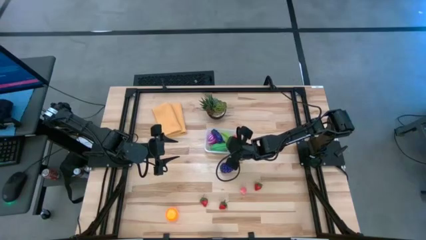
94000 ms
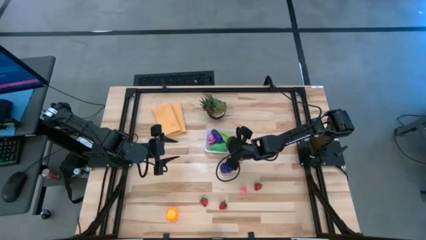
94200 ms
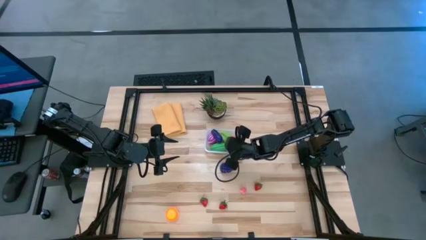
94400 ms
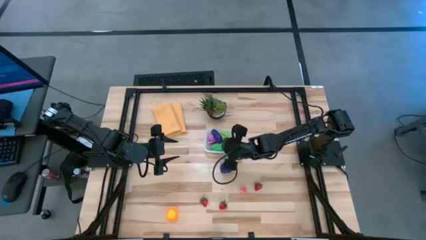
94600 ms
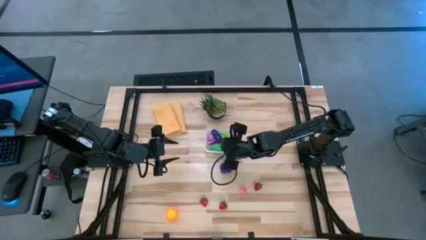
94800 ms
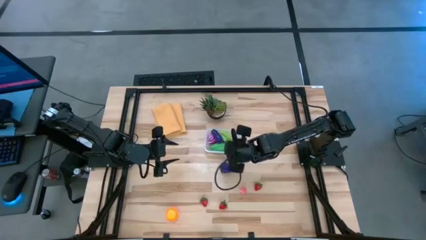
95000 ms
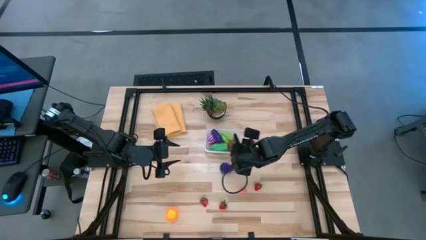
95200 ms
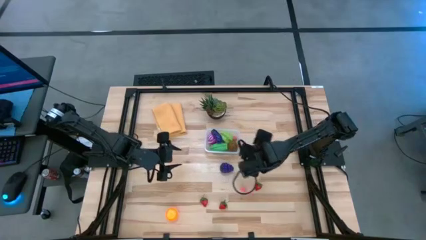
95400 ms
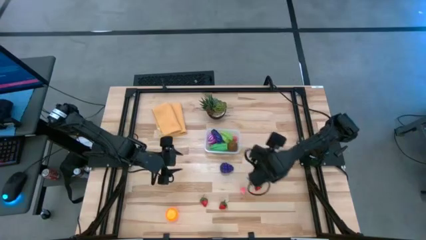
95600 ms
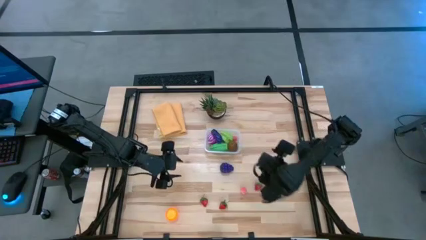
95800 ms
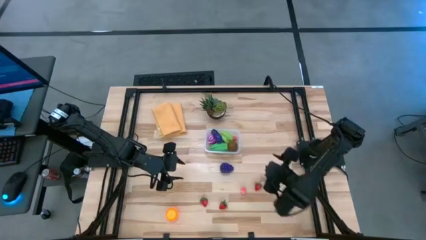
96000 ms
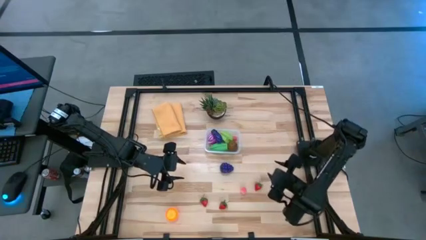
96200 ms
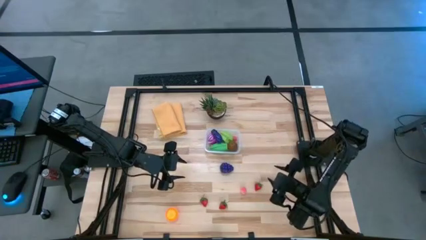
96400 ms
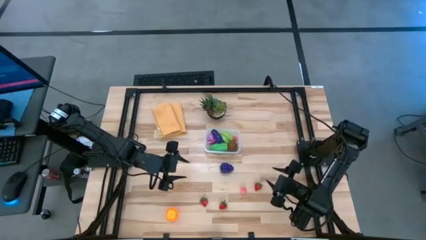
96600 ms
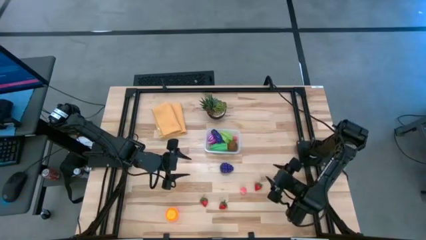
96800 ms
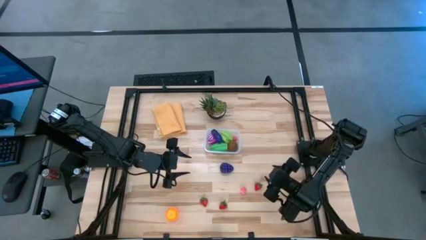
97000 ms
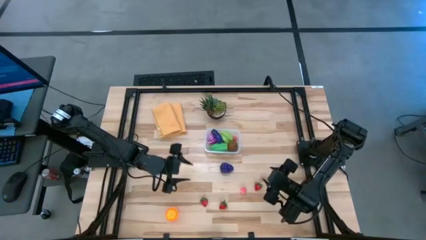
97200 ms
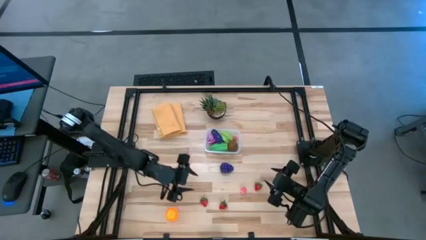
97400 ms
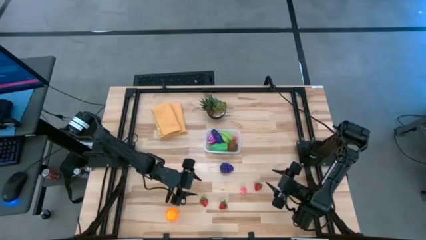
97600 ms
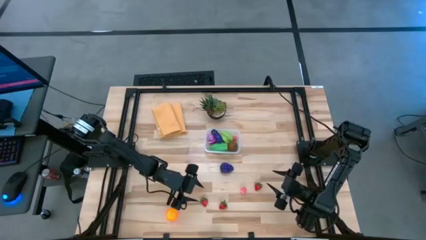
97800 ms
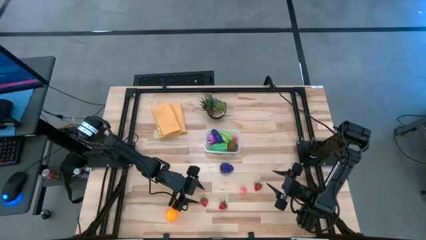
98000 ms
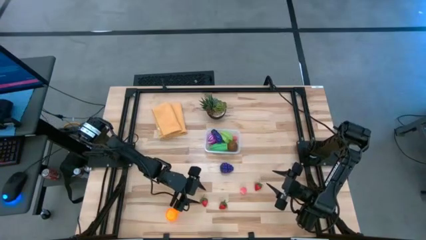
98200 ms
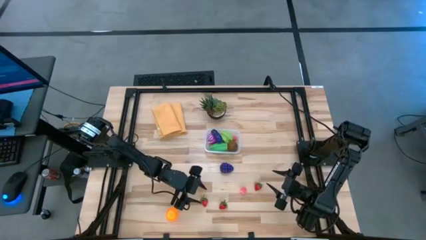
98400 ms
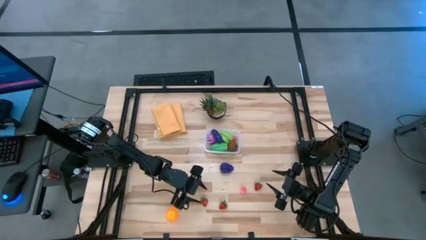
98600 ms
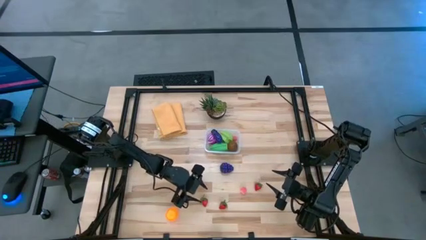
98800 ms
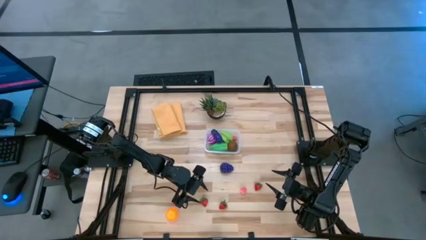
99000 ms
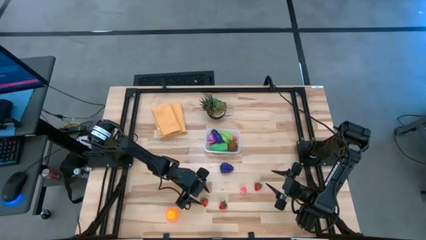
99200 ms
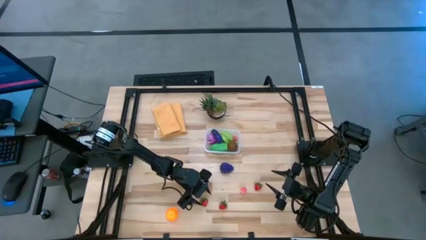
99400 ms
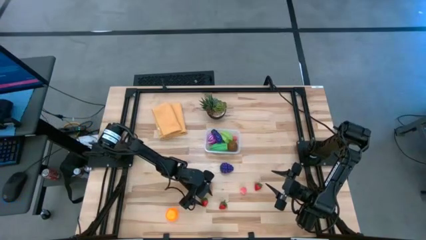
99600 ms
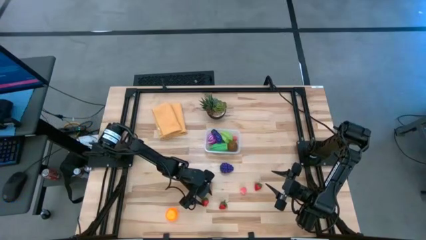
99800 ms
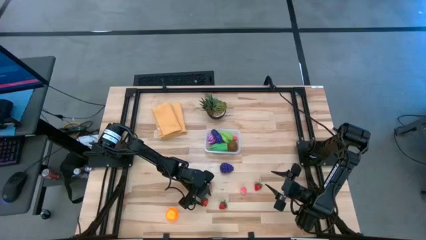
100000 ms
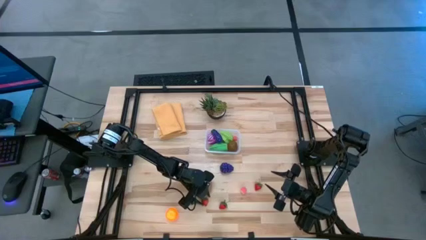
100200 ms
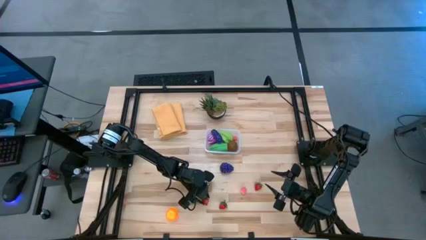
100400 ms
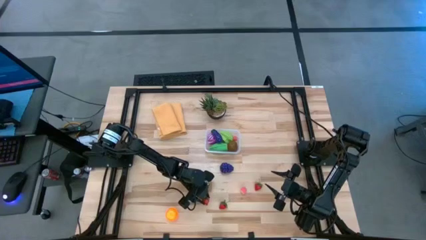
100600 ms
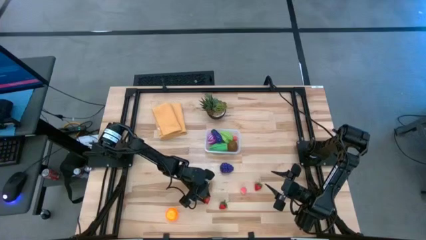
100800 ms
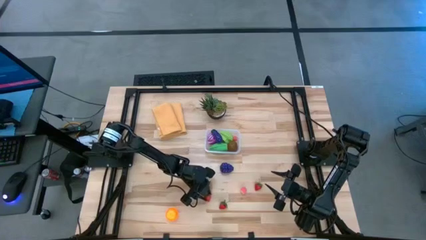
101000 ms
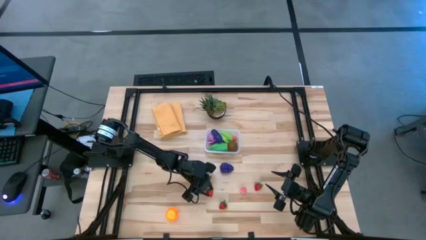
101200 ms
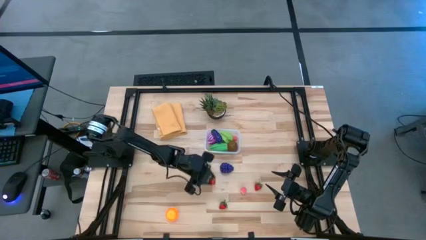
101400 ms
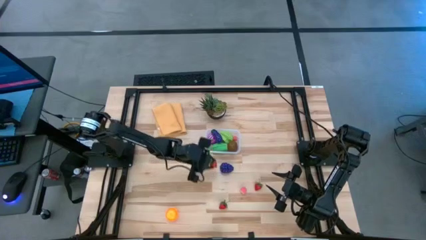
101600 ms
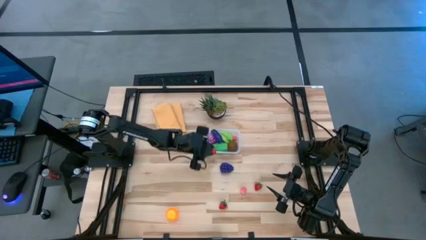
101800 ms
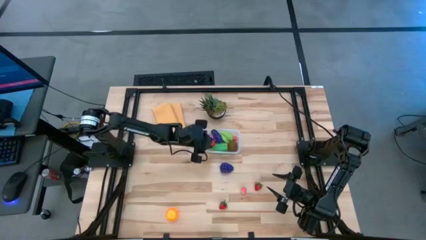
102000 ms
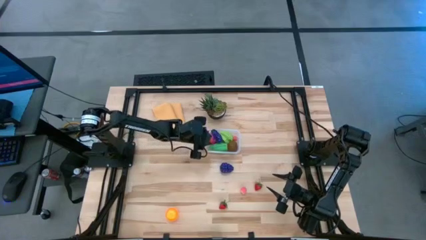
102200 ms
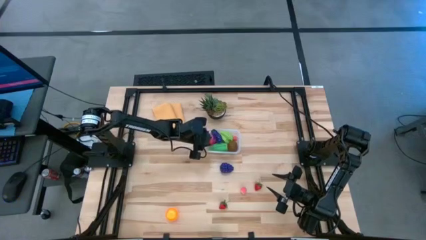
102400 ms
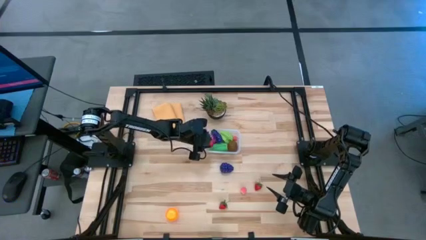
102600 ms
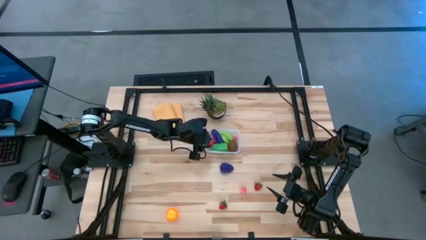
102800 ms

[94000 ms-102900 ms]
Task: Pick and placing Produce into tupperware
Put the bottom left red strawberry into the transparent container

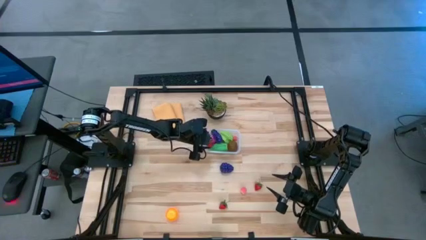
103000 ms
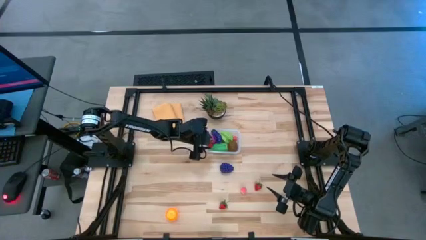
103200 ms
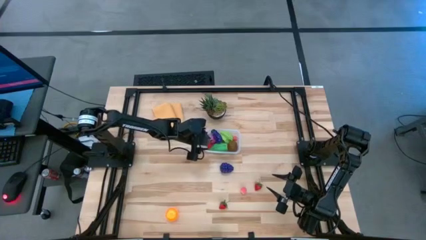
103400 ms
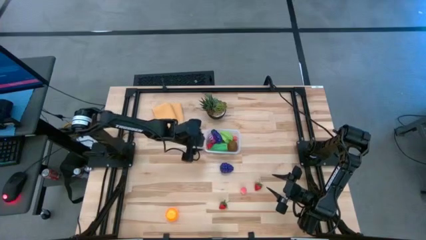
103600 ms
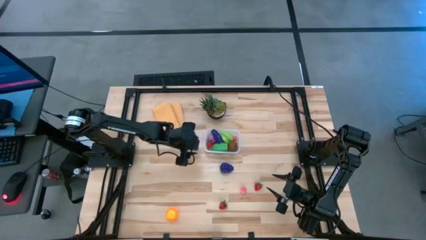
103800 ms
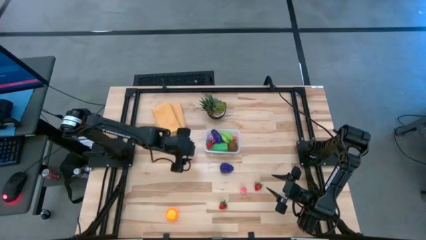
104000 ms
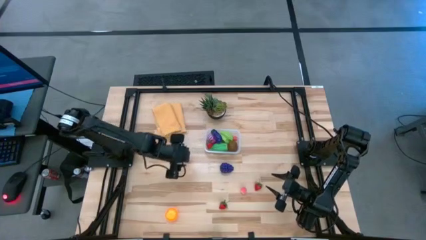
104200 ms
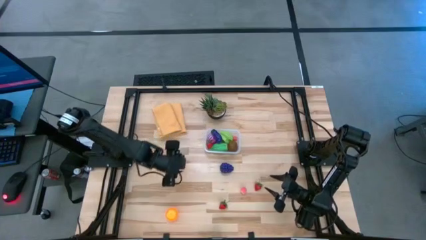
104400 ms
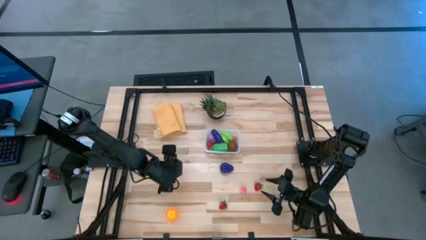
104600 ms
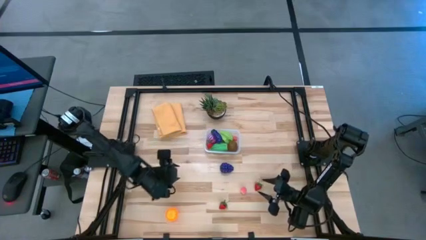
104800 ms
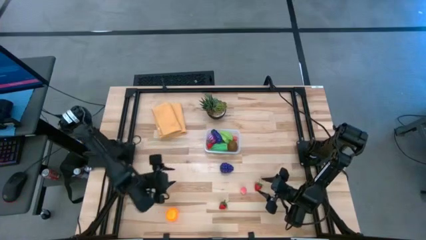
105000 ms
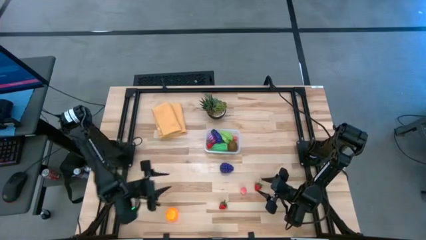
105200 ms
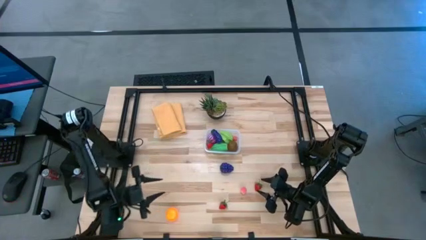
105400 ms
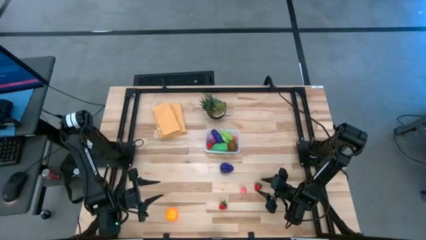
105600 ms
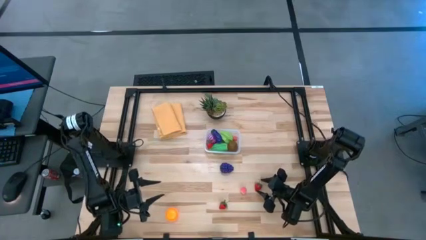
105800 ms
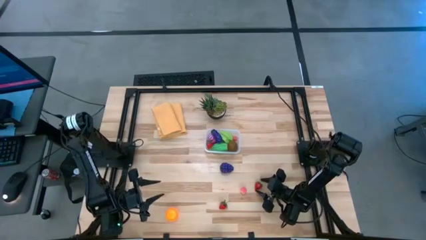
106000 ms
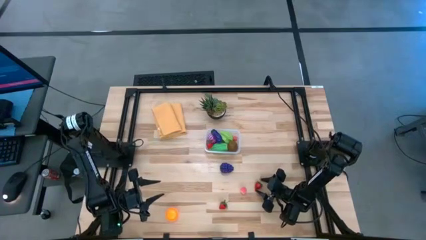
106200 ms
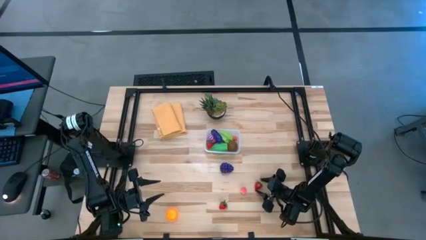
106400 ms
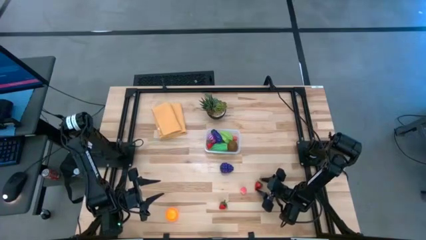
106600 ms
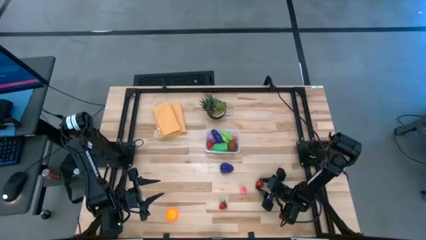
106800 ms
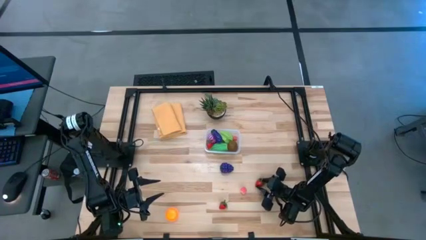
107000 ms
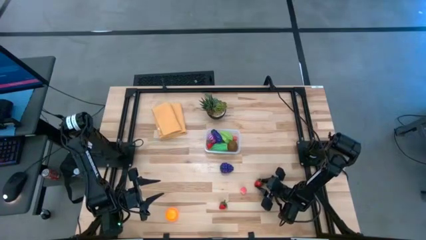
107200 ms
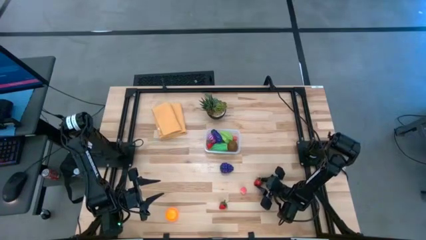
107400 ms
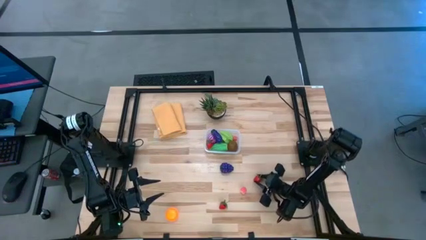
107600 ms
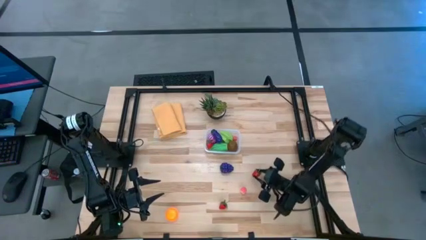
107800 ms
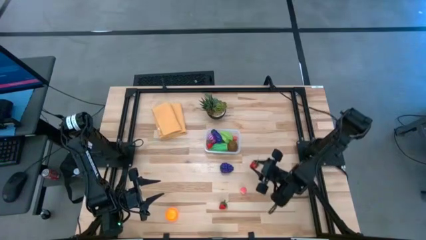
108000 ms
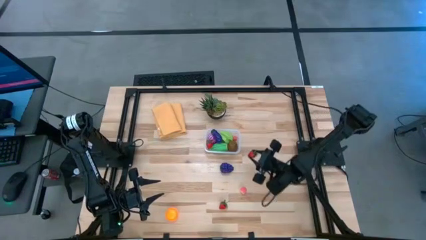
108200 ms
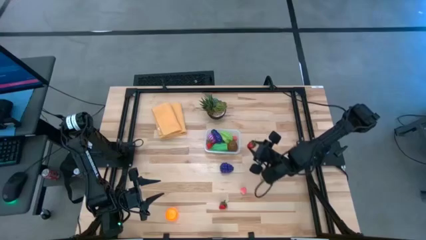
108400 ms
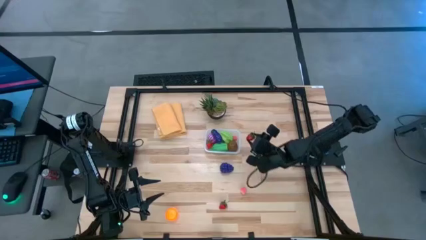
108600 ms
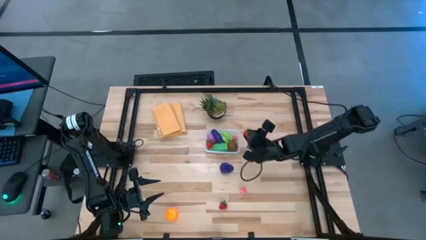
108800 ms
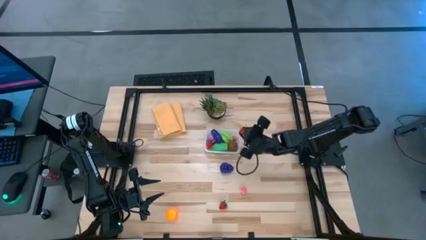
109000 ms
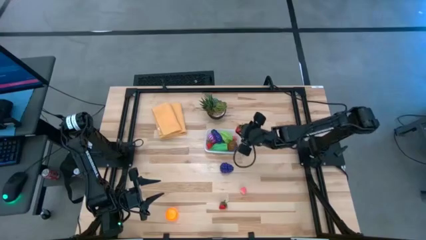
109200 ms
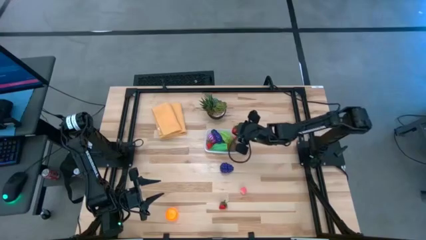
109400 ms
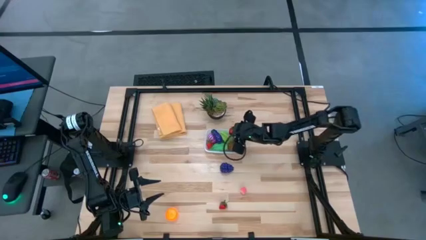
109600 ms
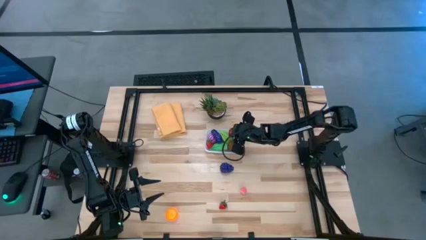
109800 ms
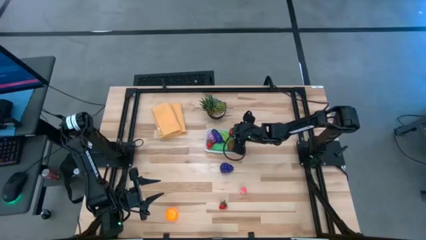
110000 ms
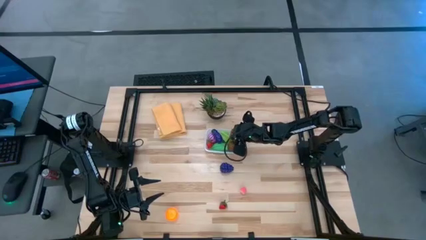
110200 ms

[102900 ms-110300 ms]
Put the right red strawberry into the transparent container
